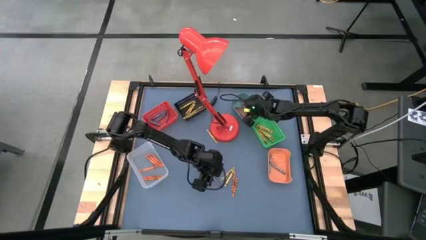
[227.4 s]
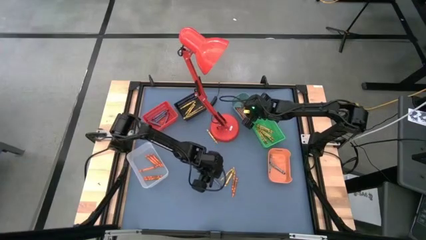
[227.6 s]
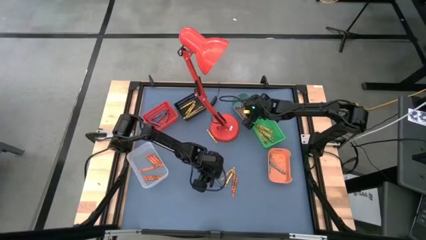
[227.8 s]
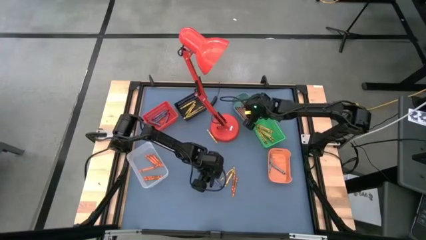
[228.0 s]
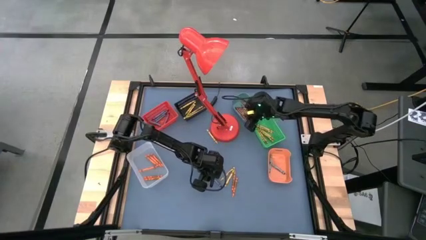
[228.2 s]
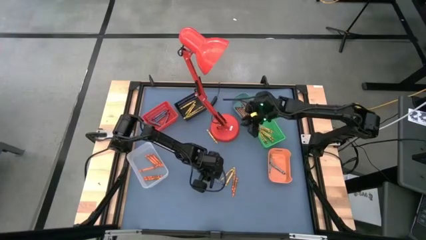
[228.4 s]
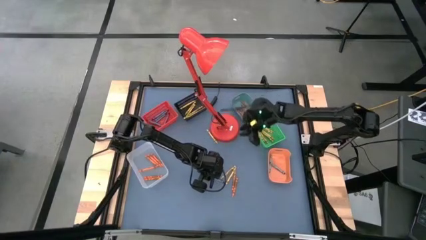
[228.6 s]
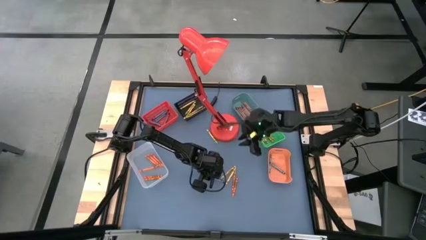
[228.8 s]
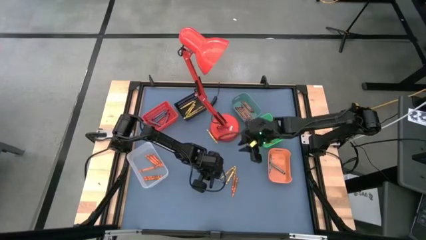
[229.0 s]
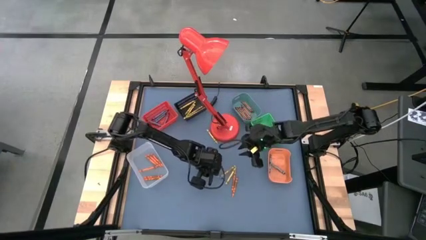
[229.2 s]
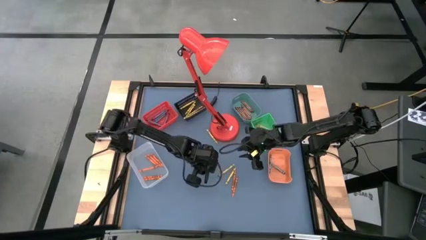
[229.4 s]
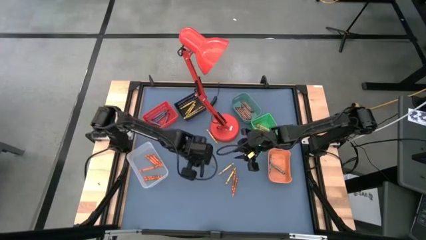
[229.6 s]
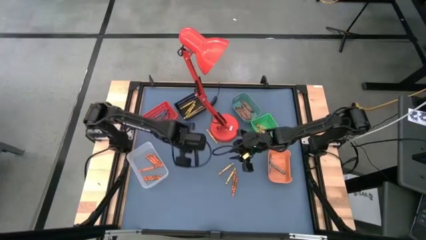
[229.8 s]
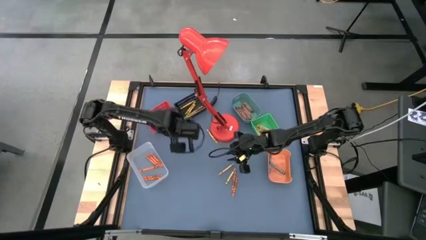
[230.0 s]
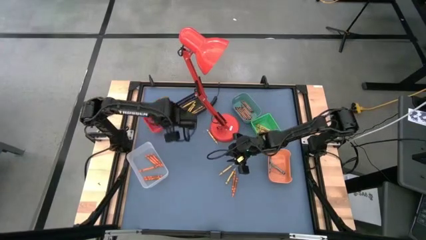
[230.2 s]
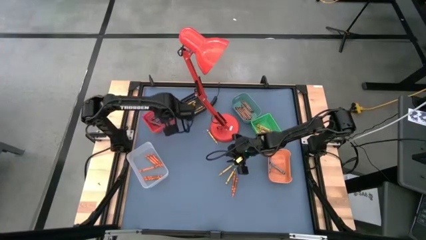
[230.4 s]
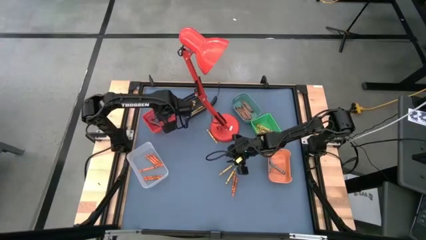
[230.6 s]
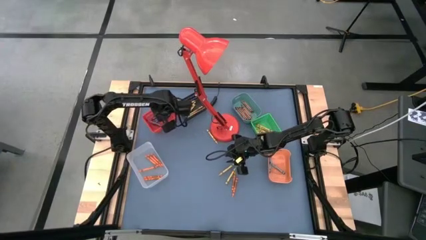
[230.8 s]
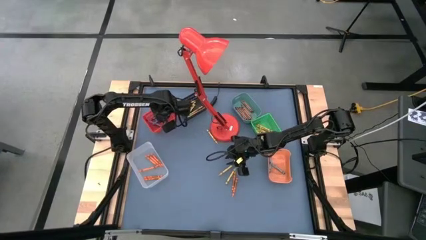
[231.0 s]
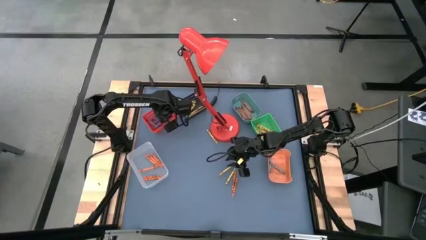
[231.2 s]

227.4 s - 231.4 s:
Task: Sort crayons
Put the blue crayon into the middle left red bin

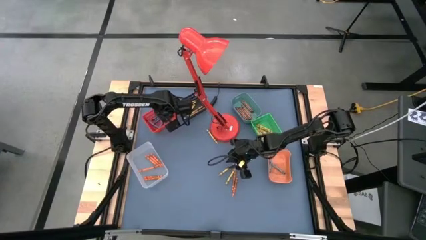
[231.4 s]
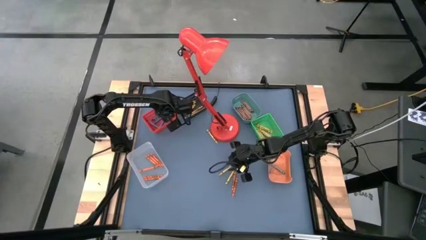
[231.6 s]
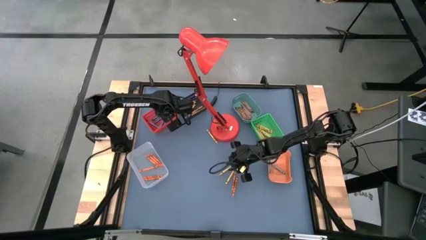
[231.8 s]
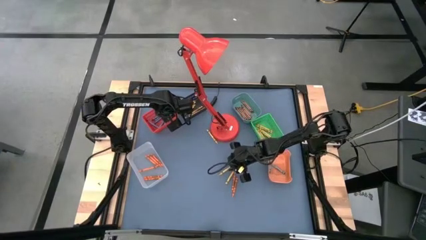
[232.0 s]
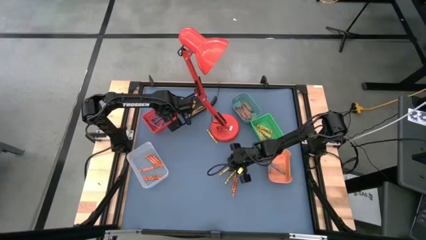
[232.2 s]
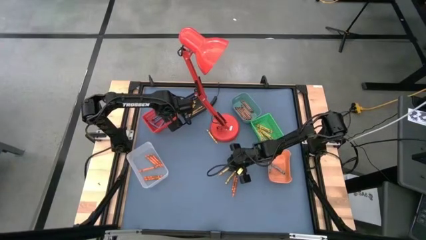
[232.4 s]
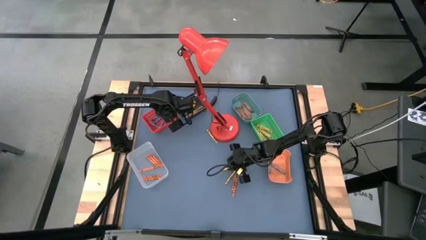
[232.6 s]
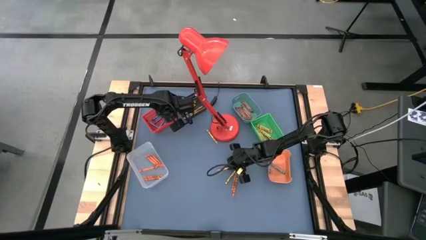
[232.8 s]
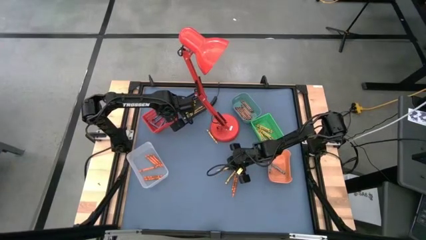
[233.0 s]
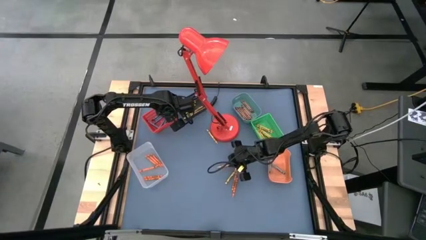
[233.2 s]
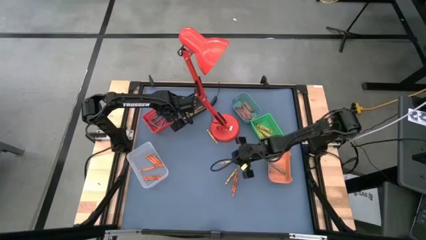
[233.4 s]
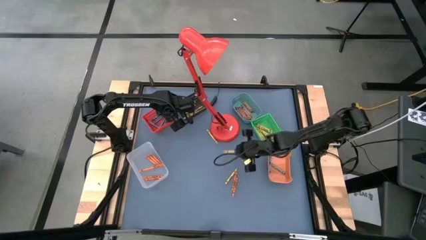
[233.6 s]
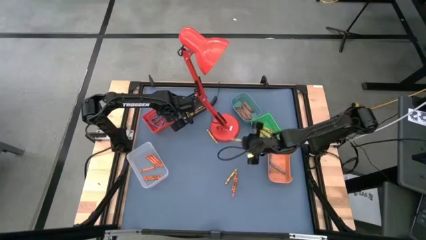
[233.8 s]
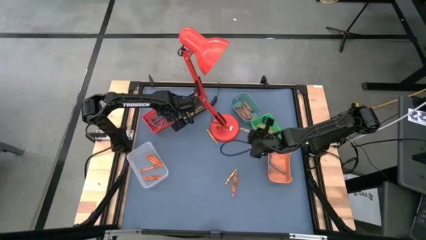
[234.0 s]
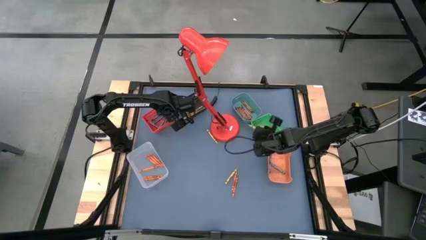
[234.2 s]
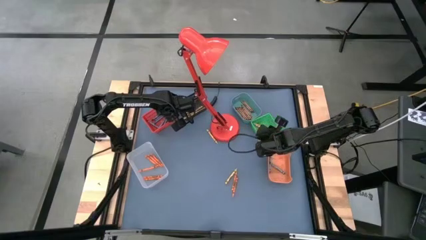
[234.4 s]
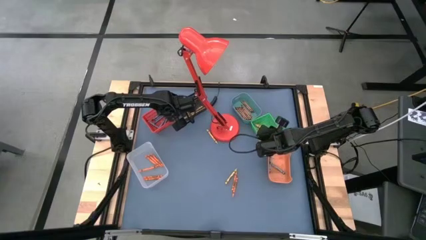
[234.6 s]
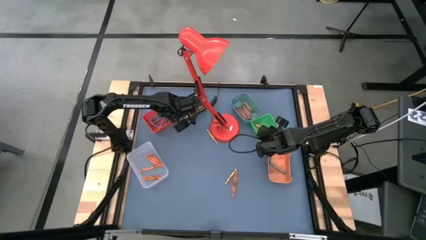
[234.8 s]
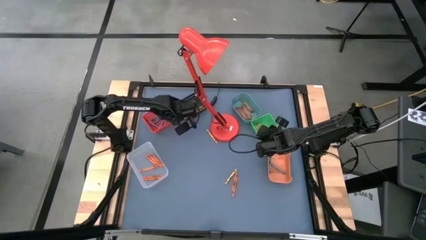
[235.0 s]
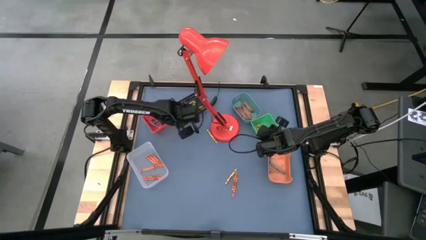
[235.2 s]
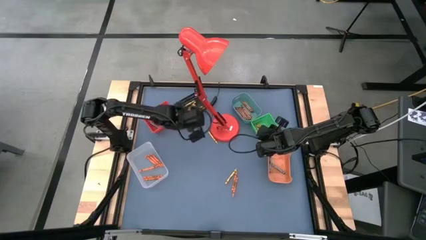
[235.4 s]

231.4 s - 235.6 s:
Put the yellow crayon into the middle right green bin

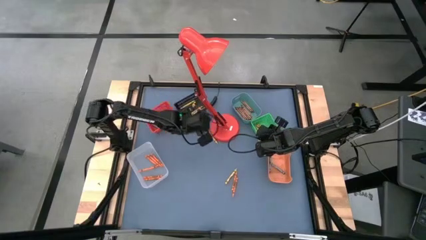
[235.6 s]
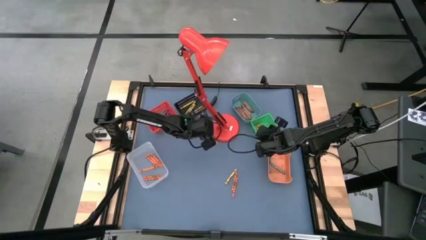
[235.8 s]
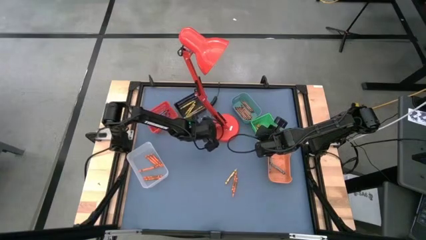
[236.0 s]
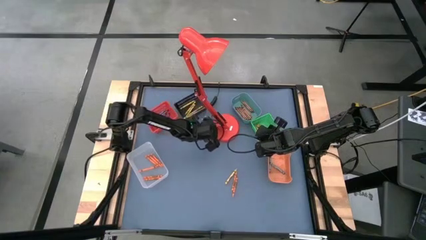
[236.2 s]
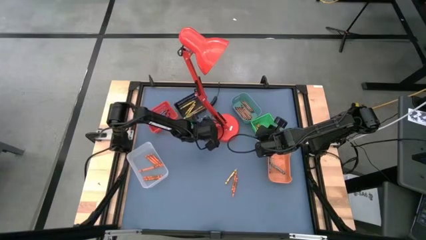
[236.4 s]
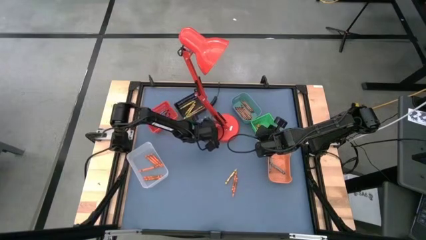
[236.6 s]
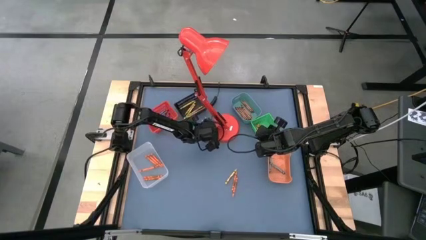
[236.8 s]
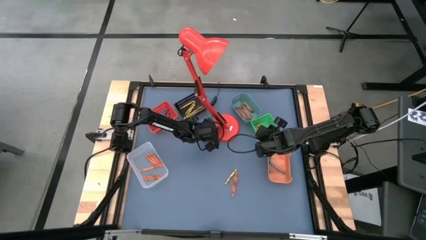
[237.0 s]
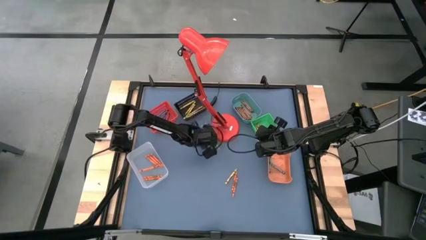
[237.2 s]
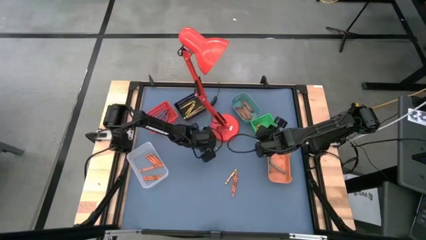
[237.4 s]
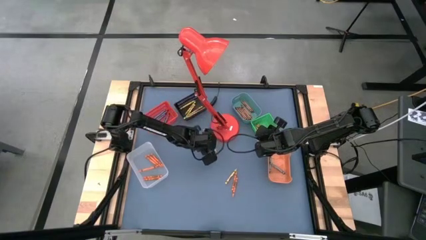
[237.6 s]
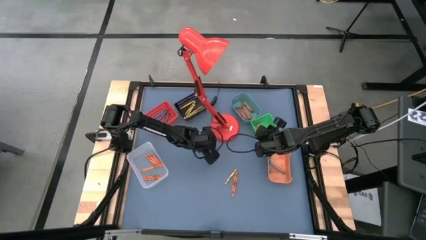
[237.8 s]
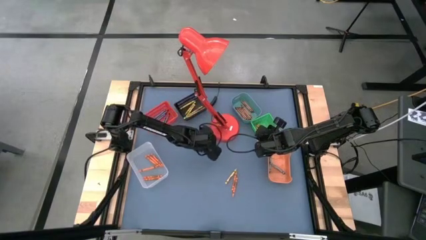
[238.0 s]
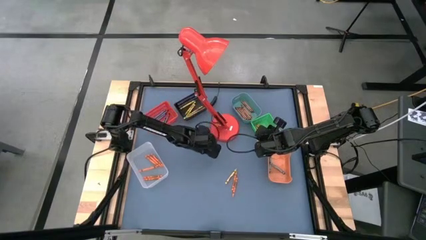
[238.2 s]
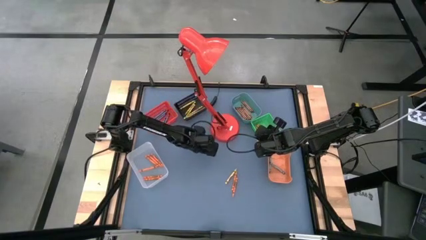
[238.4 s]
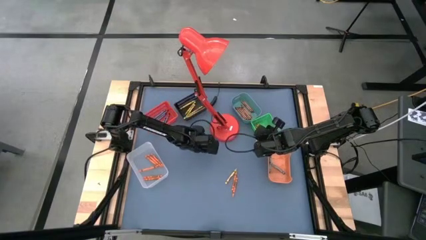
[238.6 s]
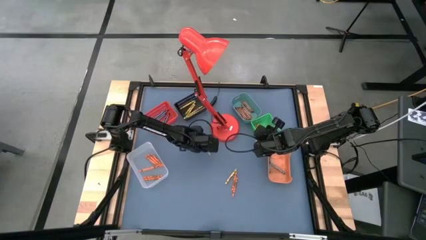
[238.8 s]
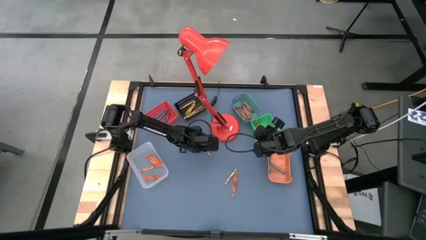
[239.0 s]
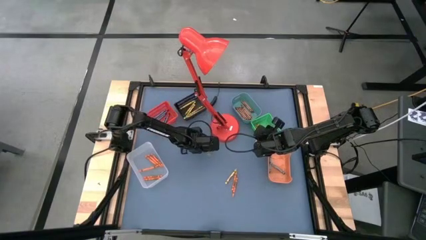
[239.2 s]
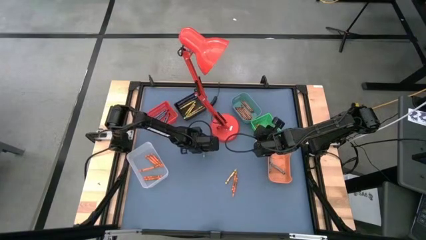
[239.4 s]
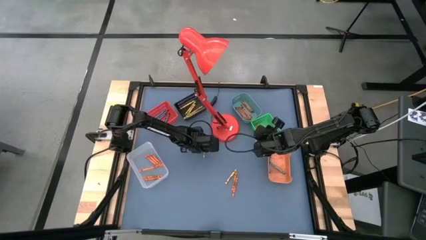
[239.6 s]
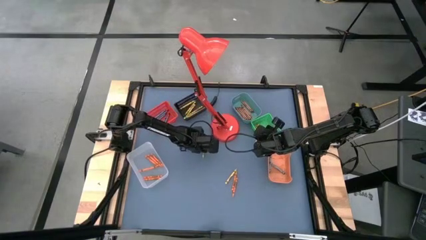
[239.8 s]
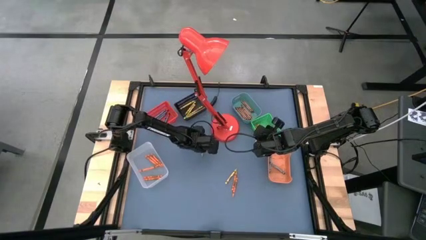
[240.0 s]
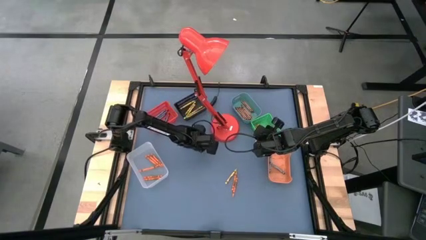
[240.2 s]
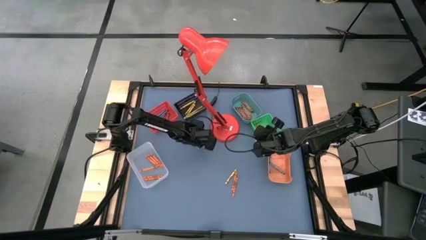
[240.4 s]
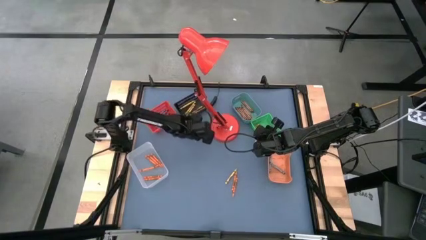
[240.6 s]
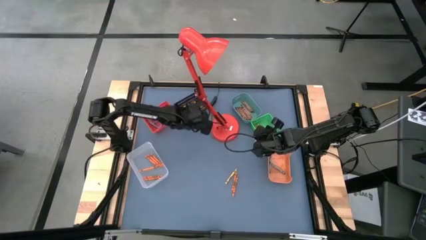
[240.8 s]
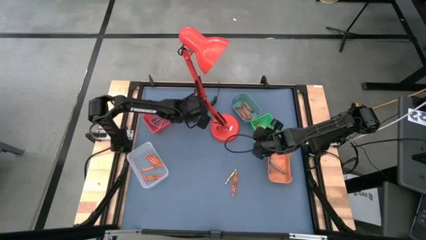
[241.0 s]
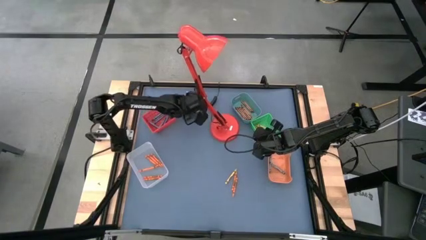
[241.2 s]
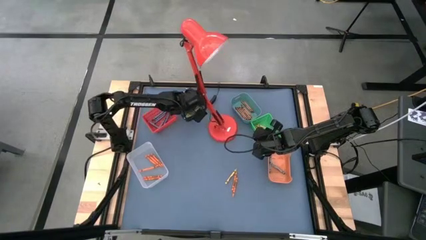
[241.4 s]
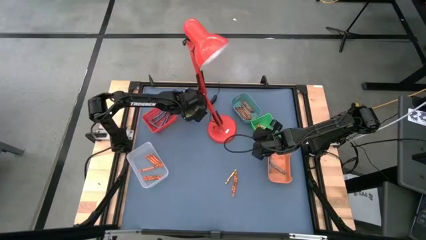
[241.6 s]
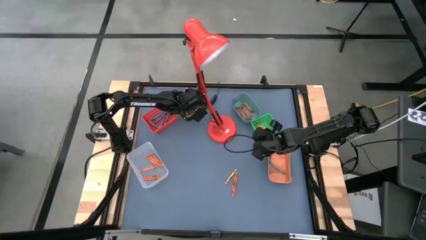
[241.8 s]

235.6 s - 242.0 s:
Put the yellow crayon into the top left black bin

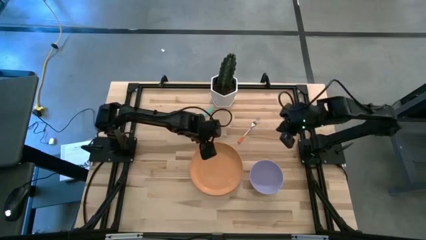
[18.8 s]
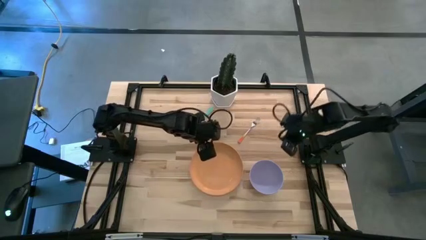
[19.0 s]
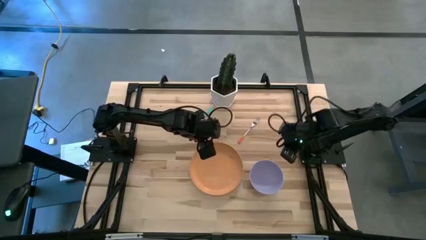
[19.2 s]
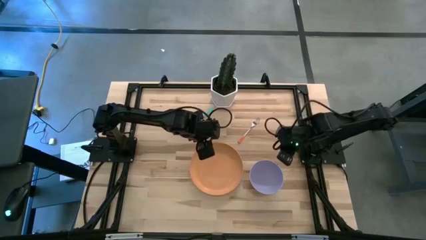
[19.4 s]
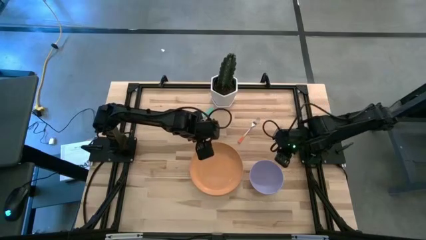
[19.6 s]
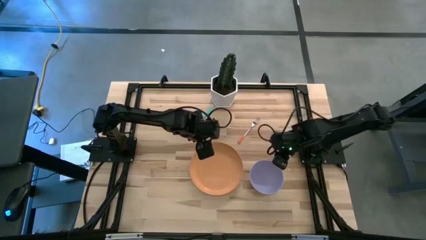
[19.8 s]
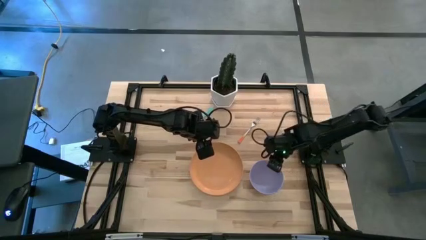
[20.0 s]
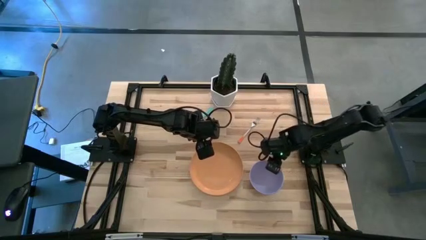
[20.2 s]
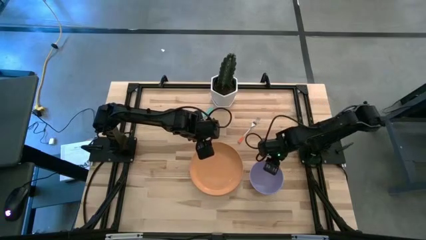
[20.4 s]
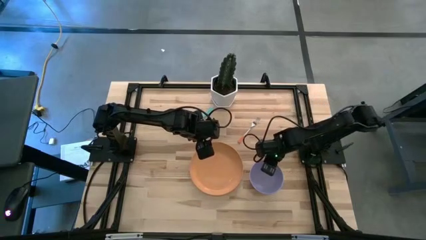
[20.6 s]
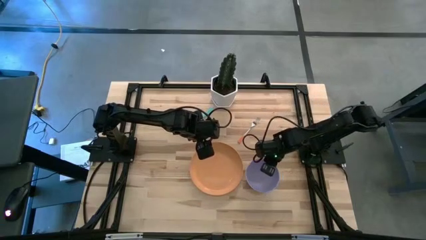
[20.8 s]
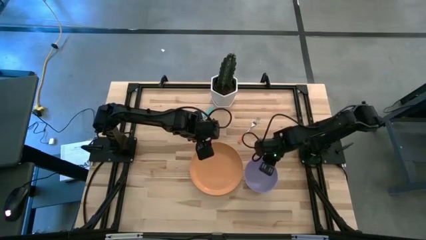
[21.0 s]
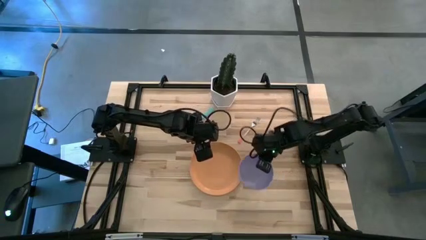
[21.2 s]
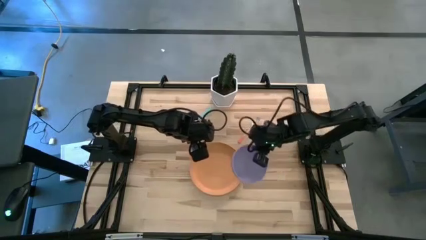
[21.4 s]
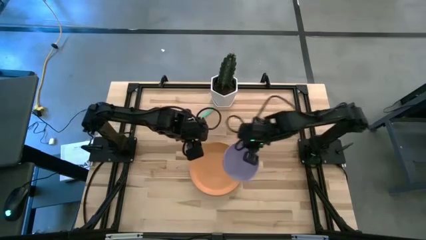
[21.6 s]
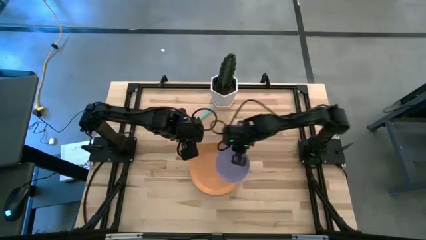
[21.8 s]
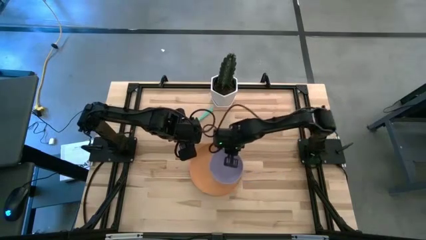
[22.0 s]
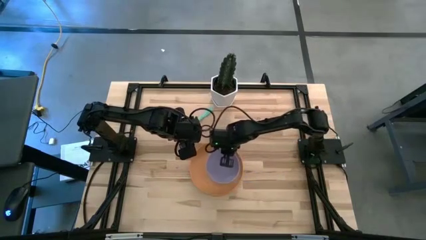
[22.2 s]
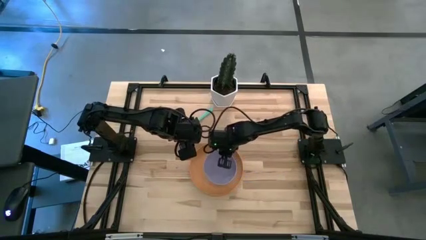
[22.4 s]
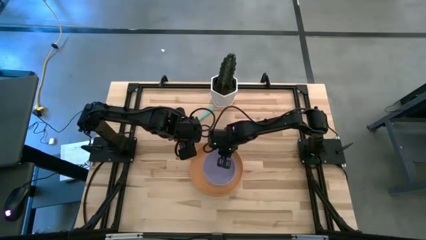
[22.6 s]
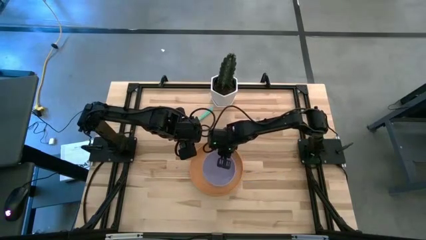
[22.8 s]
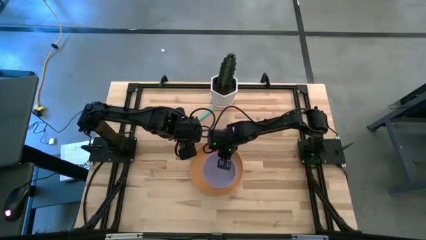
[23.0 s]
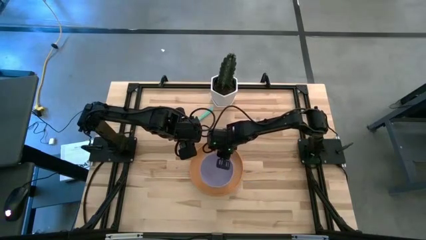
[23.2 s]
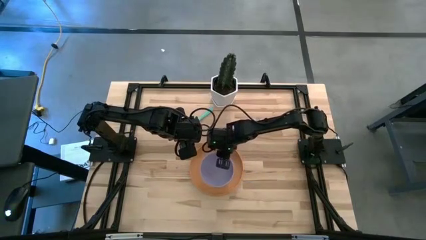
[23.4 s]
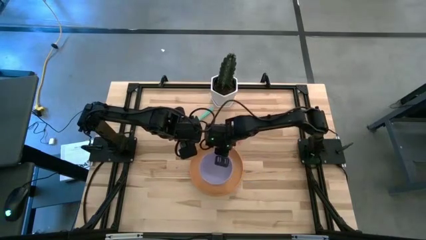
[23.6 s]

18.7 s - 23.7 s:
Task: Set table place
Put the purple bowl on the orange plate
